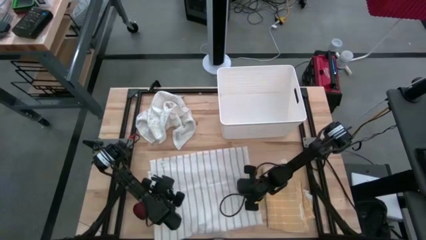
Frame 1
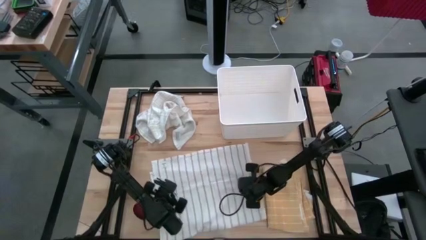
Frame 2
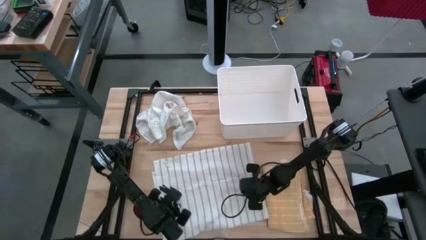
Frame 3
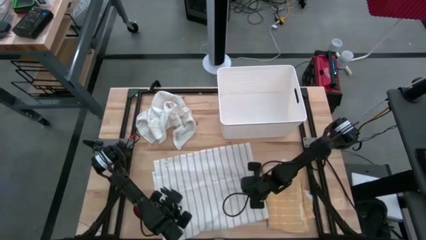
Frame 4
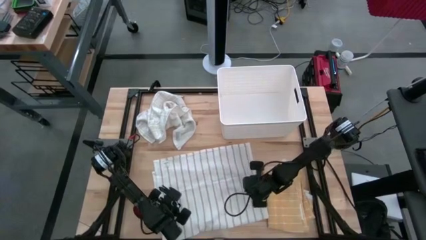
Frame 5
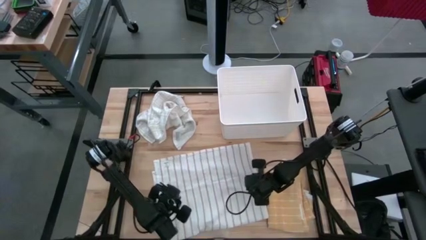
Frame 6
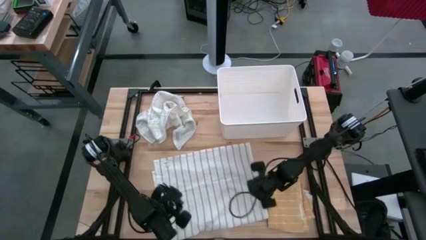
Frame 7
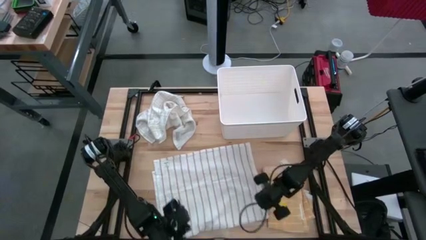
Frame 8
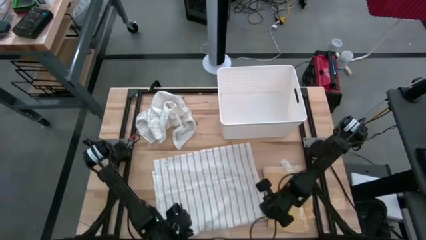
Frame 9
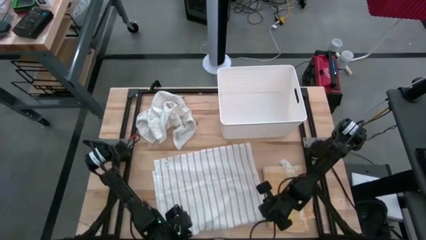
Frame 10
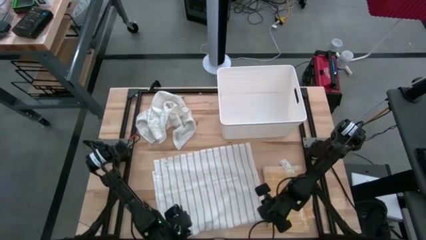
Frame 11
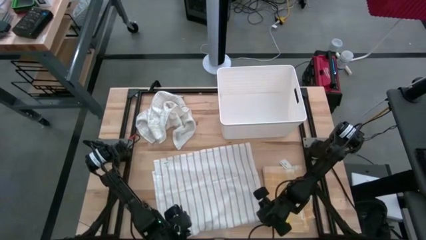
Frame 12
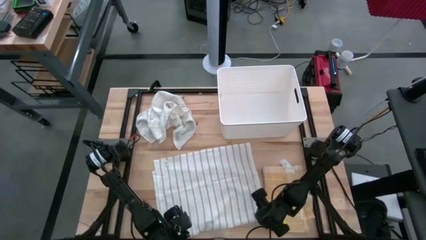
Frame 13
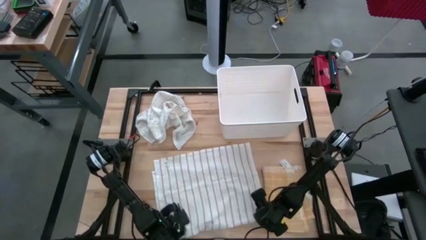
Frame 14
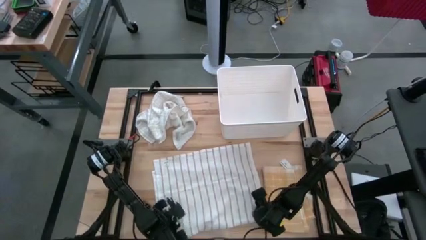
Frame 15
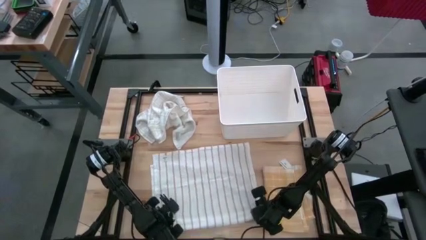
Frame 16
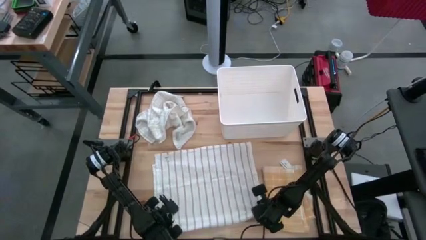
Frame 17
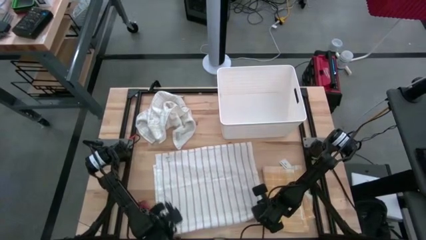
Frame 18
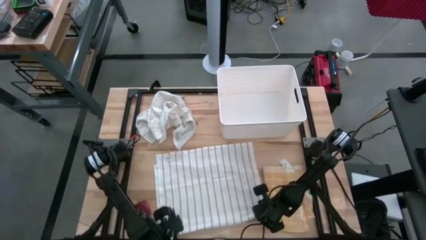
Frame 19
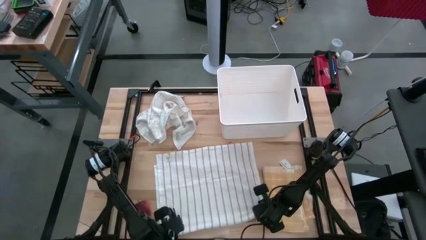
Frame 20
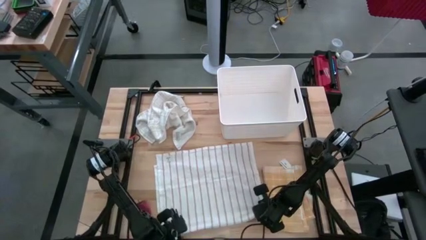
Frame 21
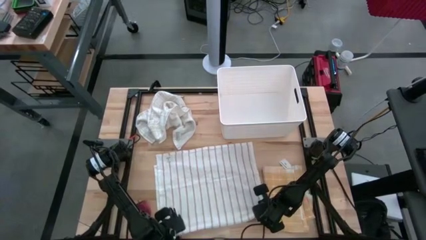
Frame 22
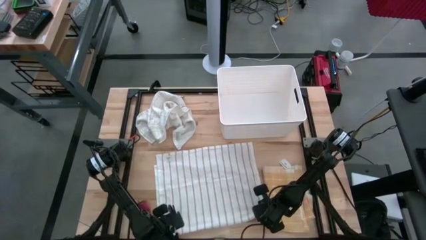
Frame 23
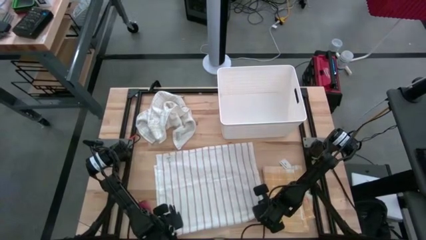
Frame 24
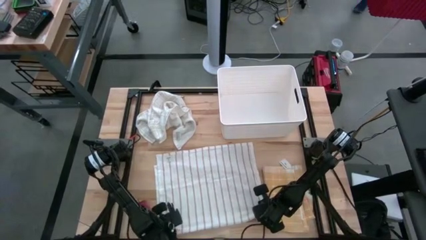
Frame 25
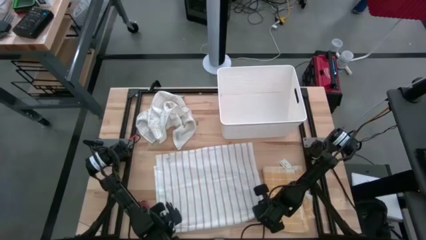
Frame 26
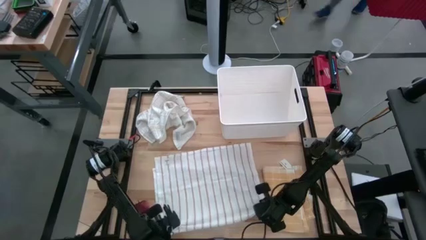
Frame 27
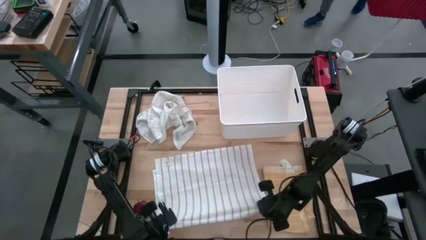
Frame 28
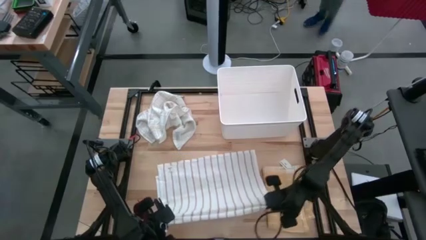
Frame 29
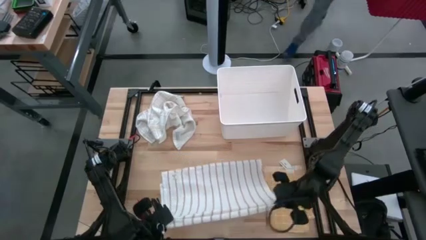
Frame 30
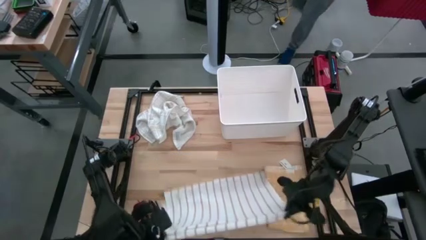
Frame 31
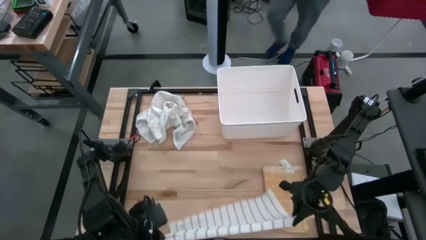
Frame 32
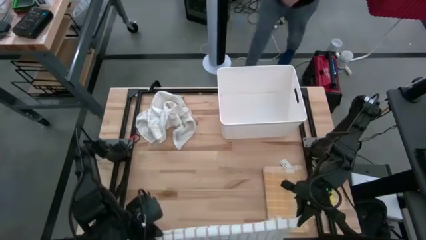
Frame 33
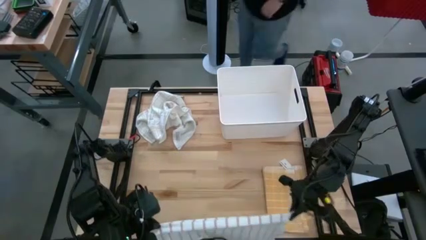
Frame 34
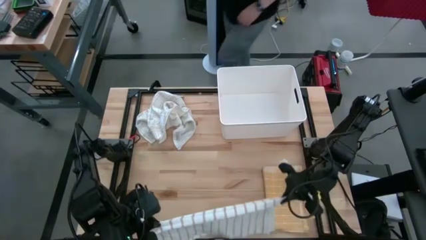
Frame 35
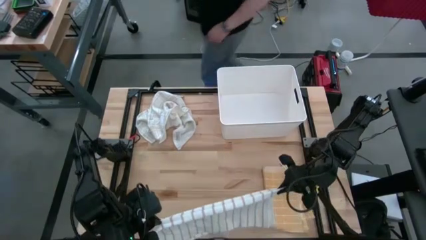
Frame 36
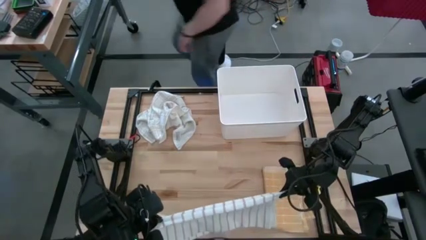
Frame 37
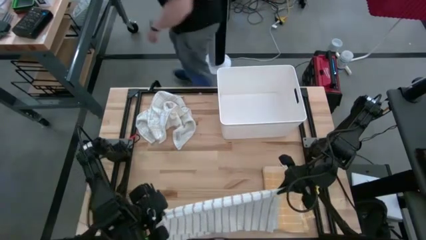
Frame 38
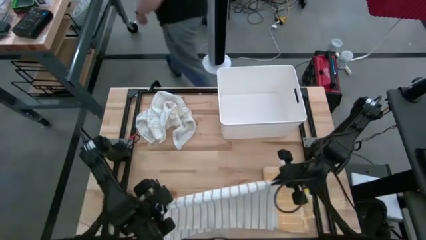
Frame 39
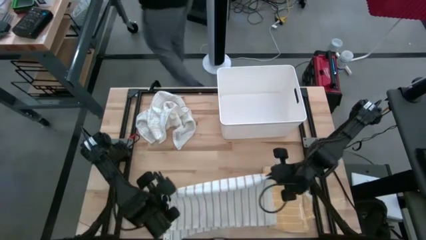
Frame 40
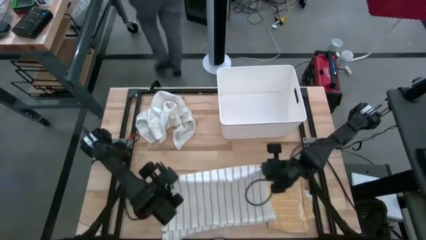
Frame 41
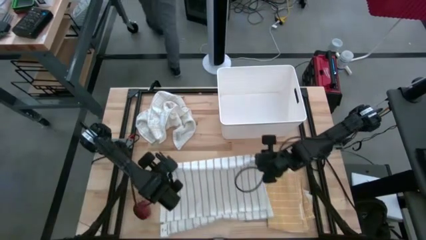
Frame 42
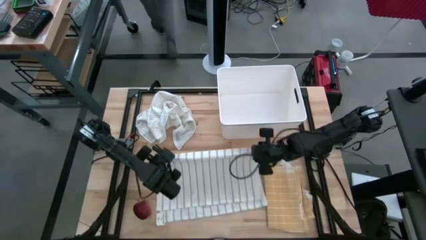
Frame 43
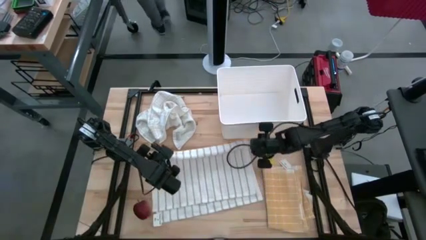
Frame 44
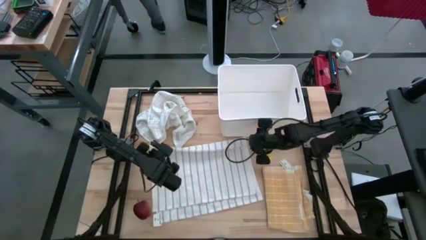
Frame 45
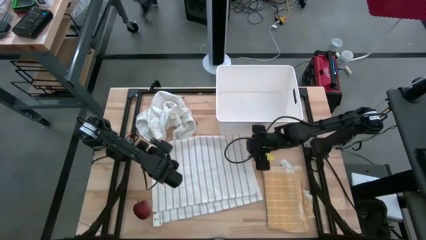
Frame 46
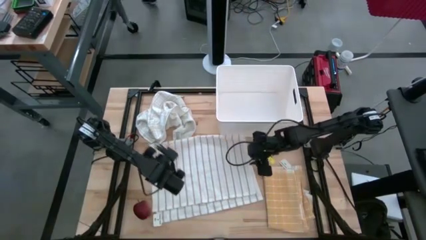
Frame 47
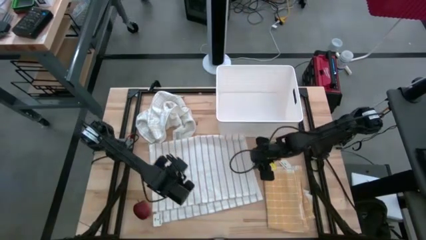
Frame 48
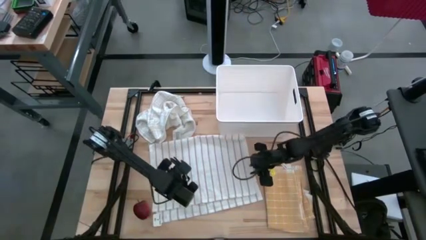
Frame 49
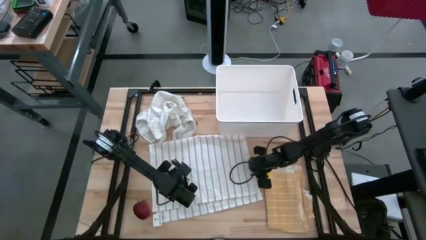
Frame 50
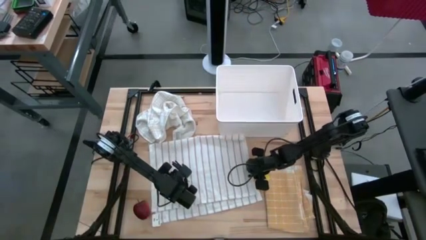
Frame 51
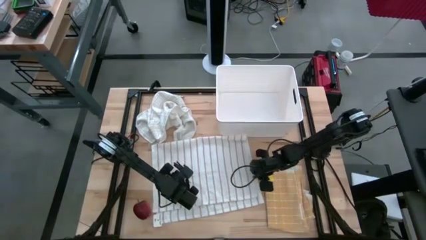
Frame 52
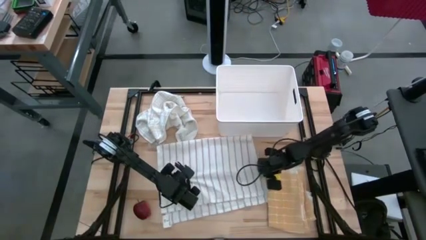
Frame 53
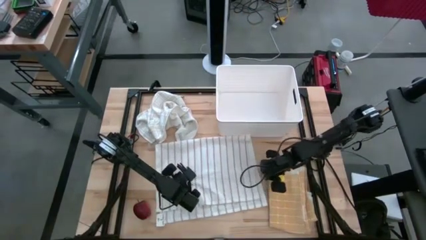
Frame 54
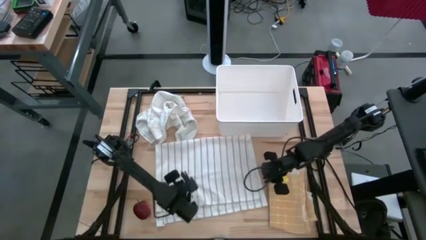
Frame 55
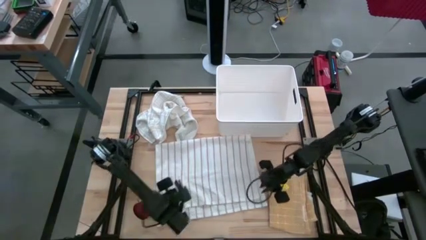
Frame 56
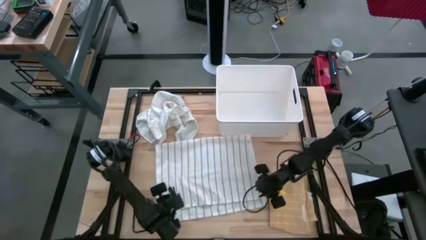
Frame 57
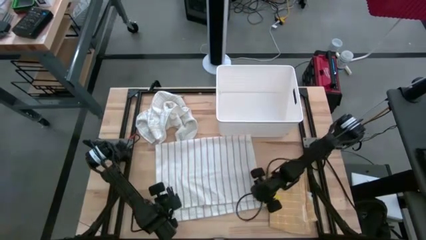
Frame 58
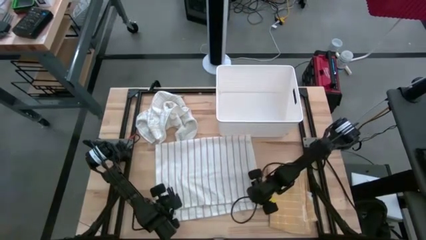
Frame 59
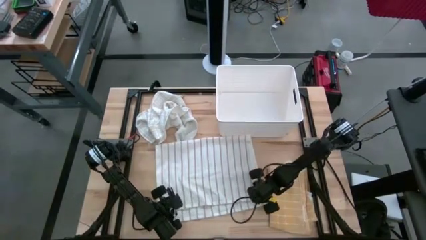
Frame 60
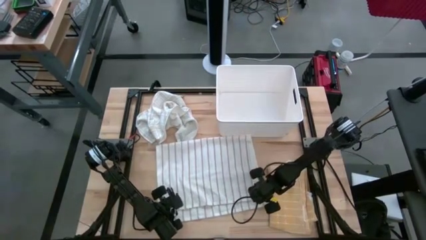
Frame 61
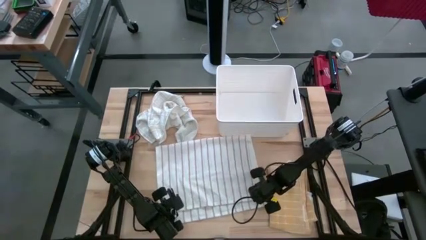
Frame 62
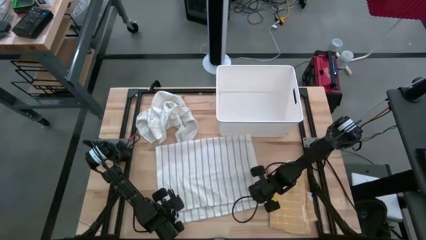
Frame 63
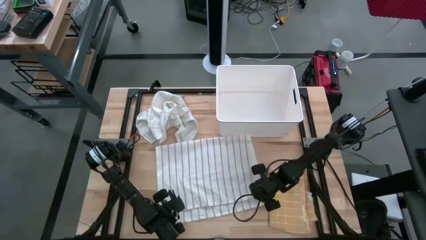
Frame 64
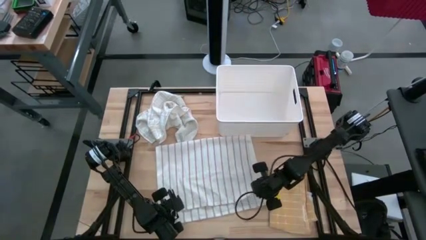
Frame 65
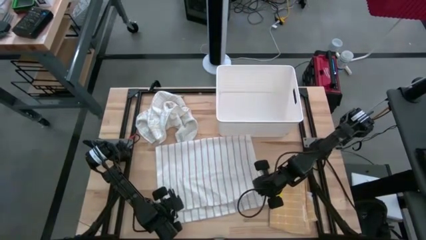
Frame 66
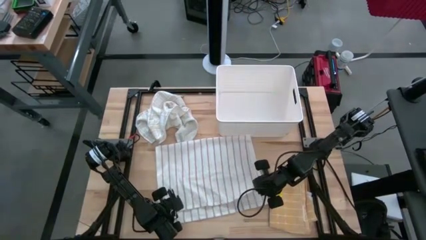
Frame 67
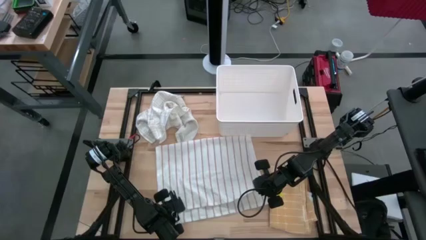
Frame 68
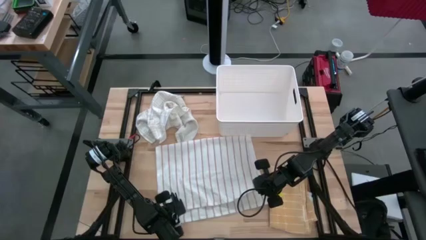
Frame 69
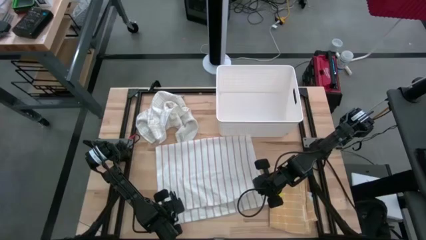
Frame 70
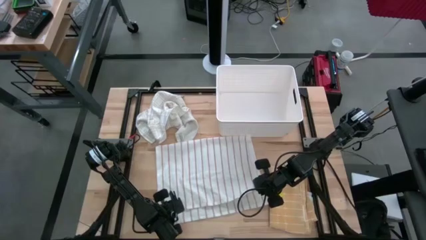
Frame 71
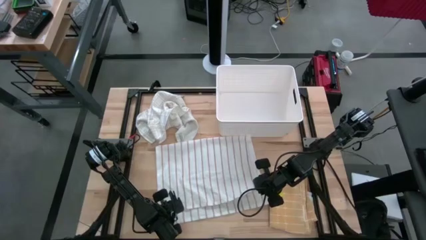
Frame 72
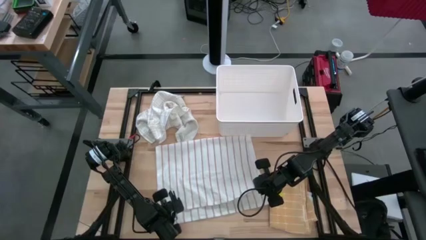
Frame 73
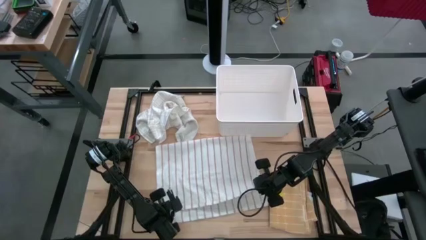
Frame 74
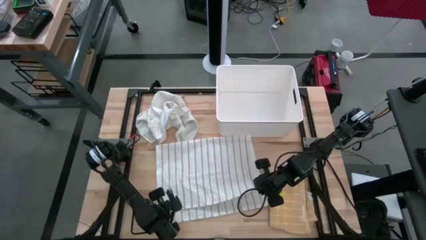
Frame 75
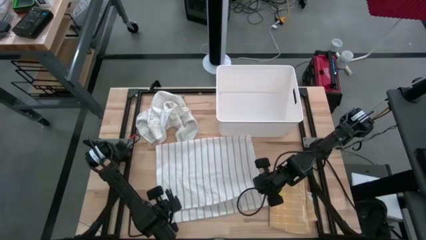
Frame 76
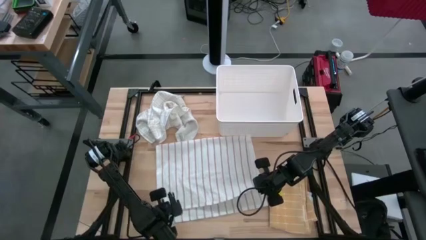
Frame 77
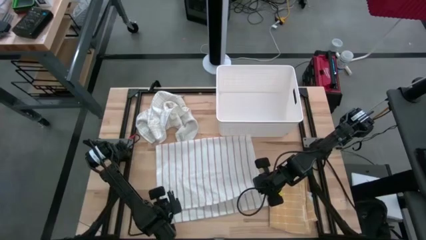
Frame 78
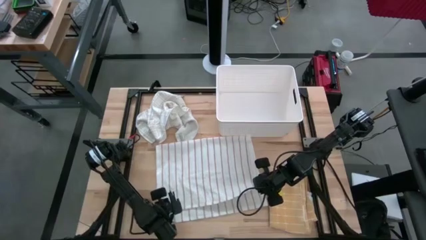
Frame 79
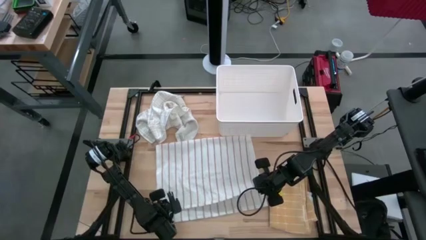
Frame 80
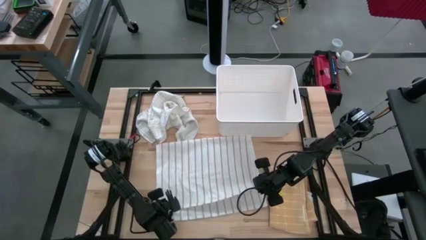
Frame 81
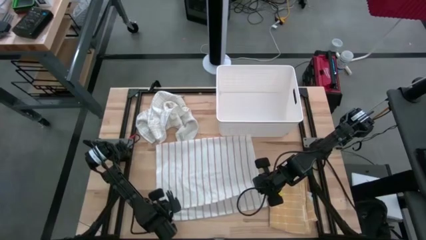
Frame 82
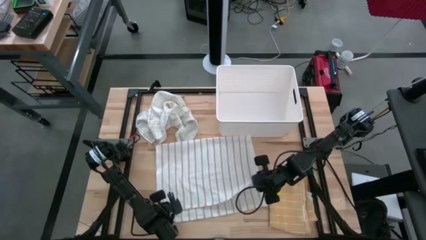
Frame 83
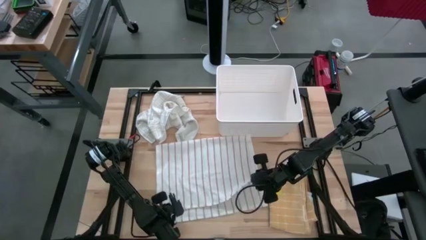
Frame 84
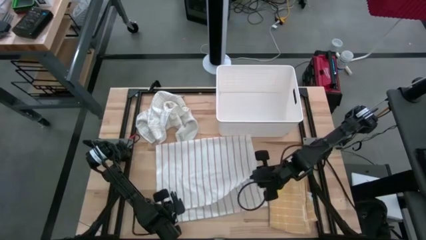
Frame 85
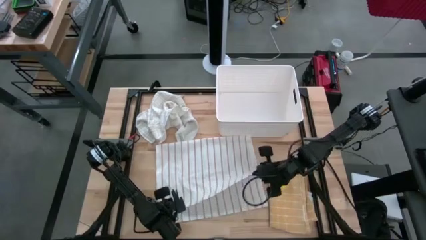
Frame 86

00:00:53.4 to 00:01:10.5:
Task: Fold towel
Fold the white striped towel
